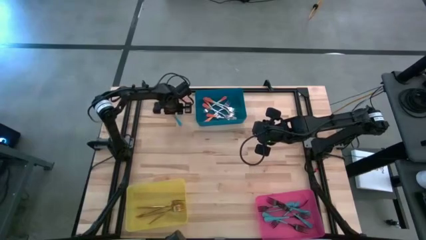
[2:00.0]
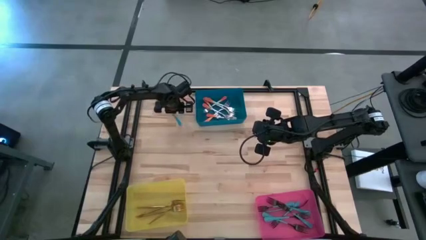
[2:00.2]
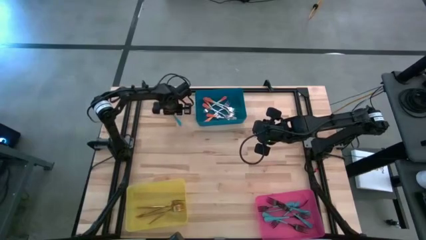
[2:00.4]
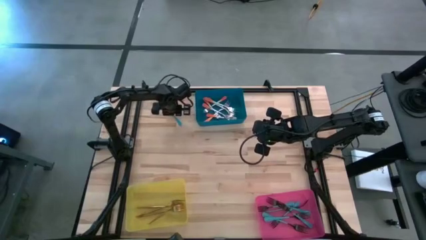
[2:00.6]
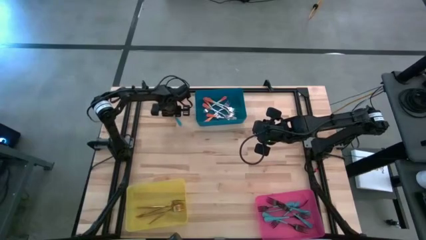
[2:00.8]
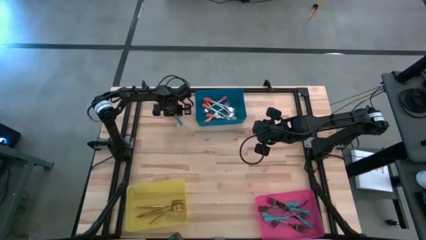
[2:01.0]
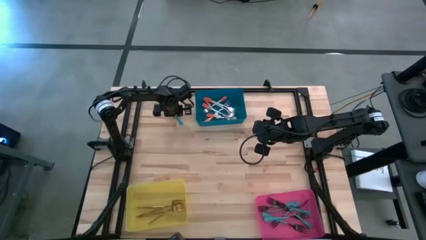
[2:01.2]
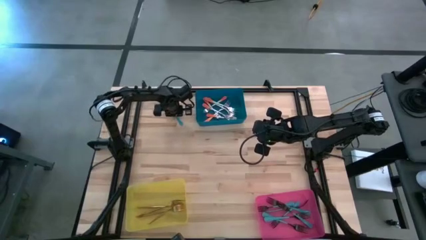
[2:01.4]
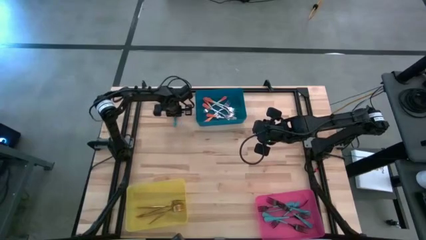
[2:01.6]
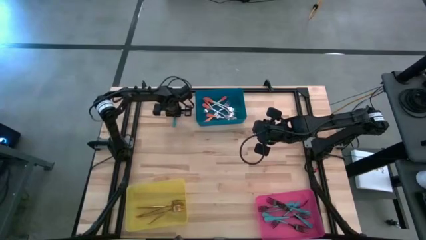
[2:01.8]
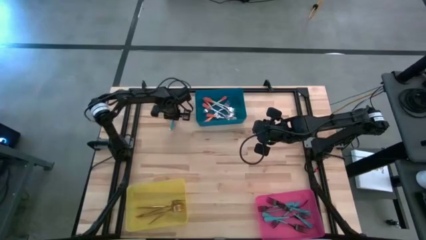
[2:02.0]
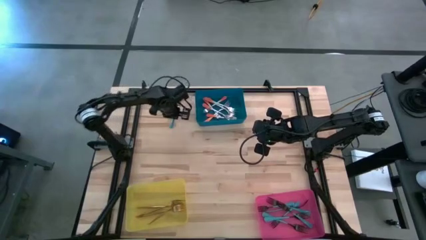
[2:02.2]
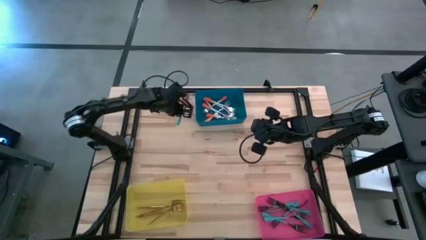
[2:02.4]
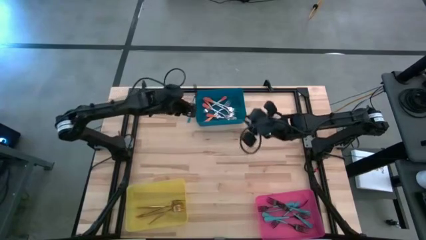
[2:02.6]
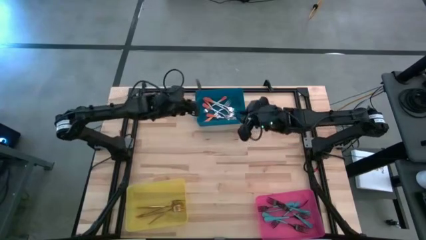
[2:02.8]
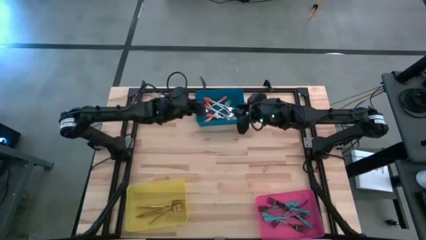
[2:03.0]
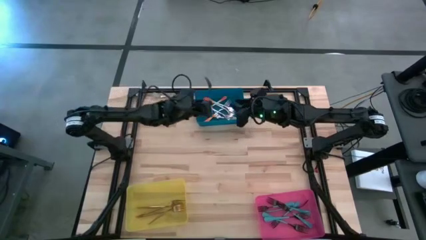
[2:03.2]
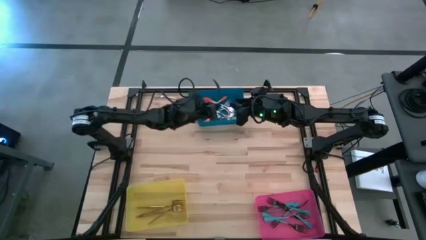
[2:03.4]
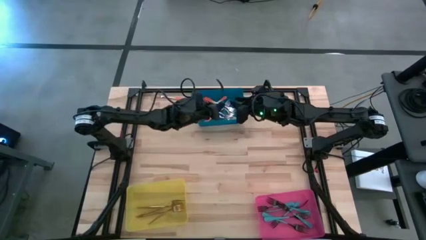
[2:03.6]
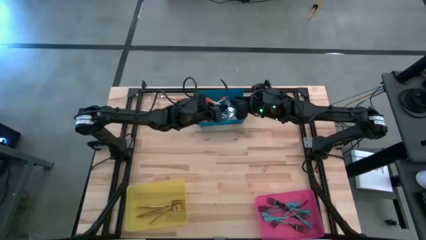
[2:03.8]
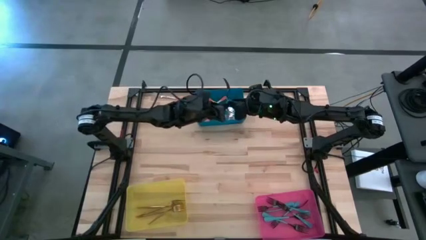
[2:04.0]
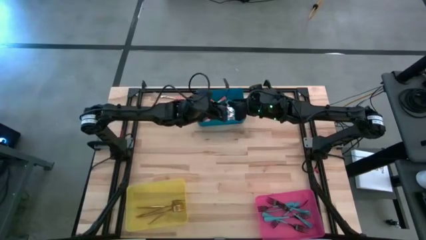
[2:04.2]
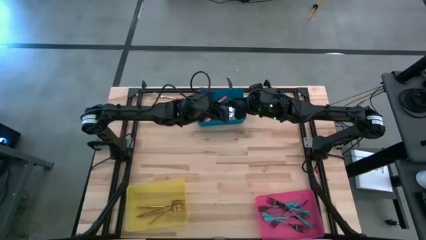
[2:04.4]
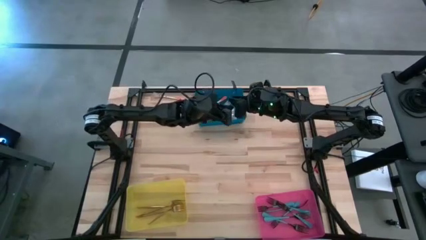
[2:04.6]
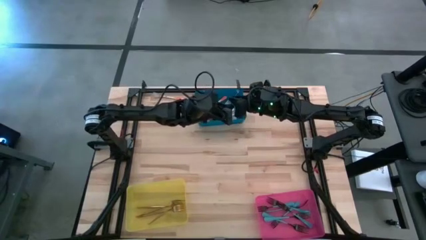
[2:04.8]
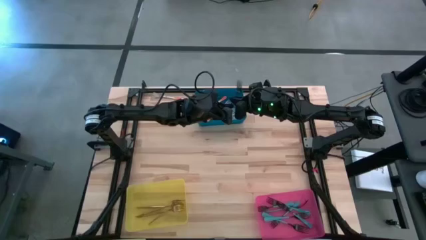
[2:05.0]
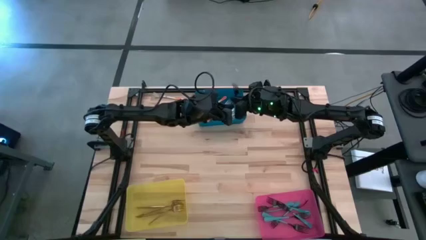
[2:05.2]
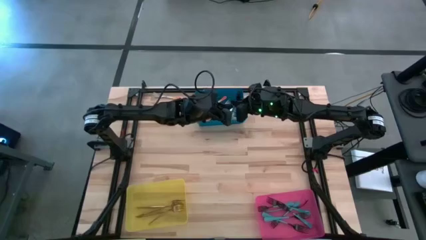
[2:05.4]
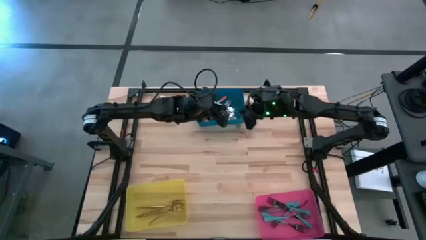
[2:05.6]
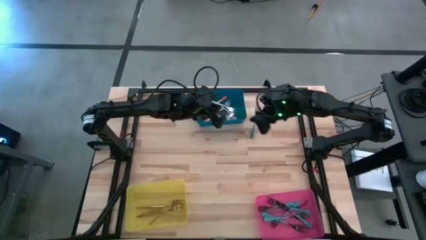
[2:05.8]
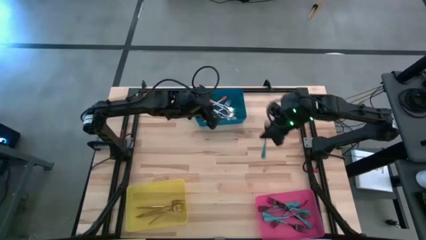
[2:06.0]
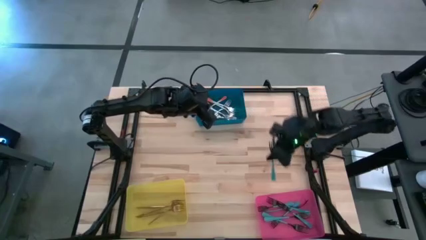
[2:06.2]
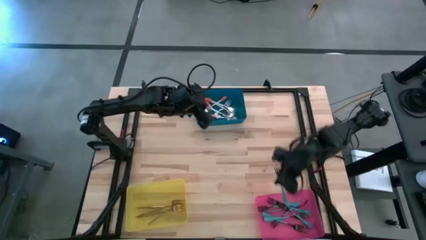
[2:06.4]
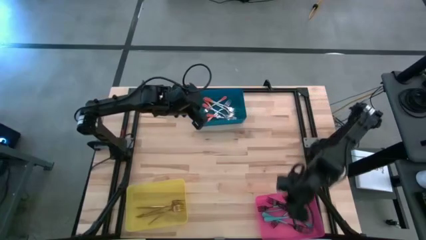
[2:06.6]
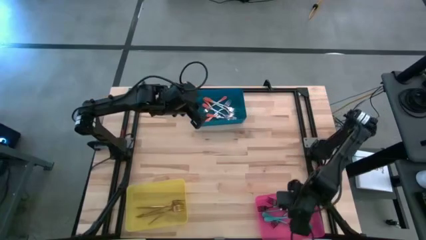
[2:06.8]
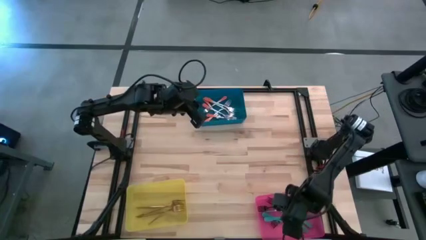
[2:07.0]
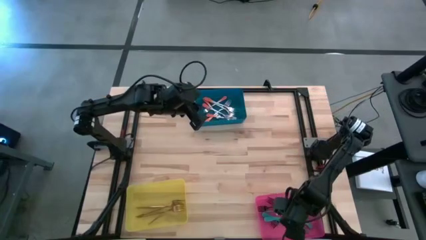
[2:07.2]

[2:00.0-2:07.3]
Task: Sort silverware by color (type)
Put the blue fork into the pink bin

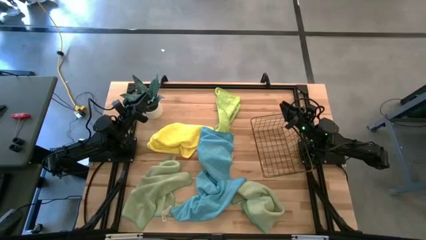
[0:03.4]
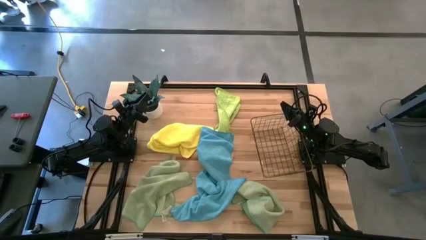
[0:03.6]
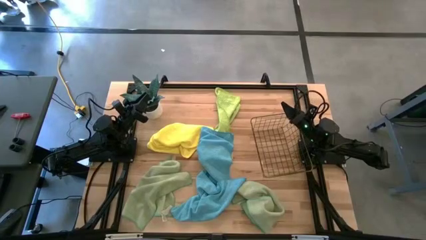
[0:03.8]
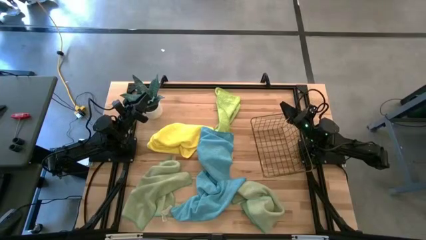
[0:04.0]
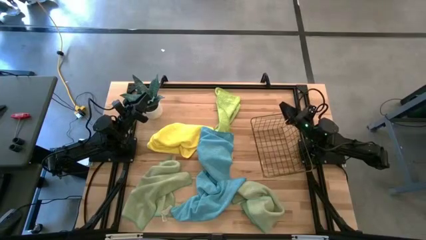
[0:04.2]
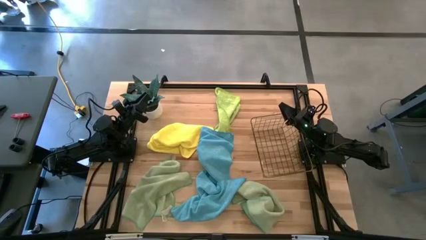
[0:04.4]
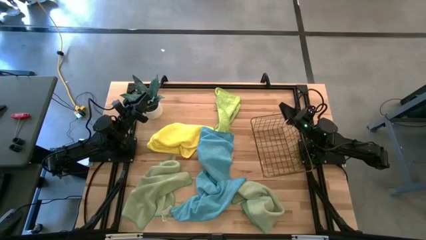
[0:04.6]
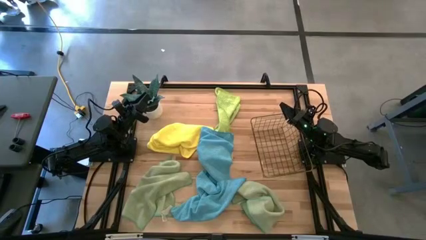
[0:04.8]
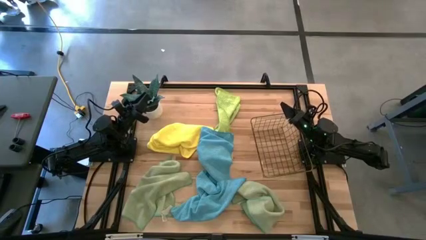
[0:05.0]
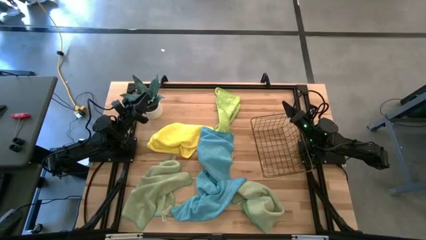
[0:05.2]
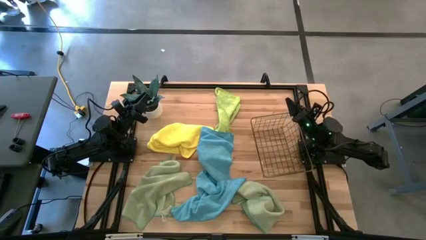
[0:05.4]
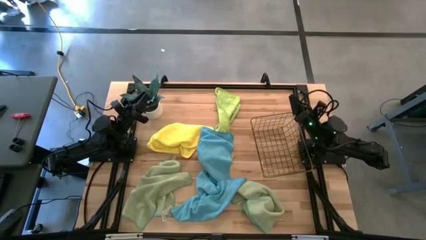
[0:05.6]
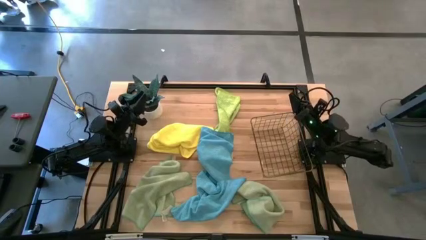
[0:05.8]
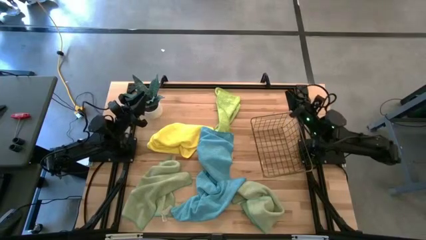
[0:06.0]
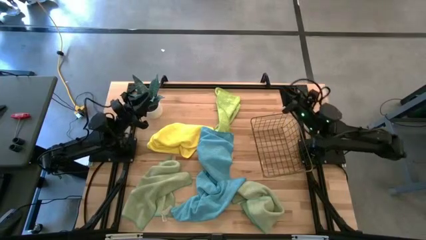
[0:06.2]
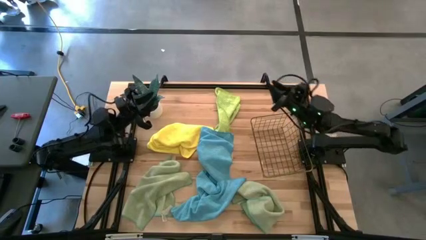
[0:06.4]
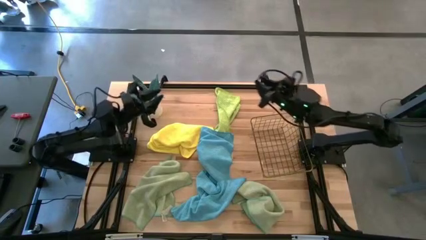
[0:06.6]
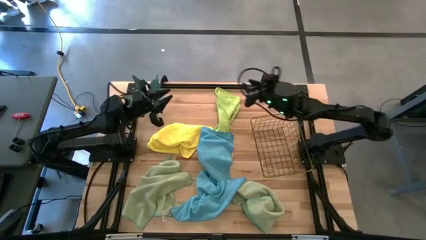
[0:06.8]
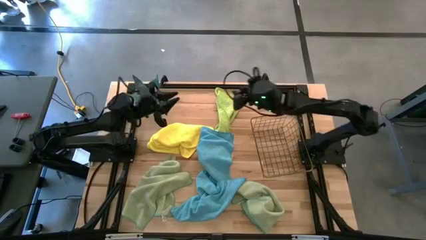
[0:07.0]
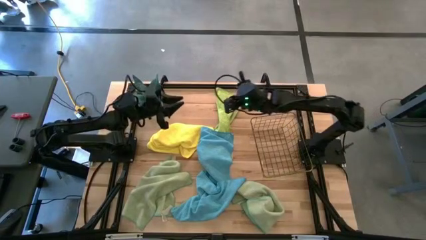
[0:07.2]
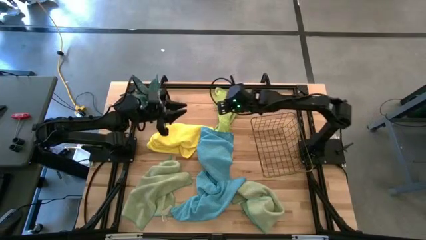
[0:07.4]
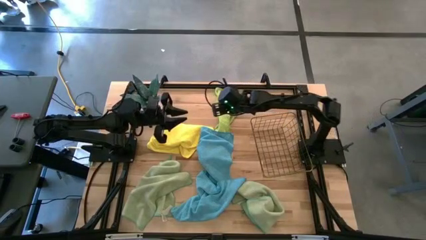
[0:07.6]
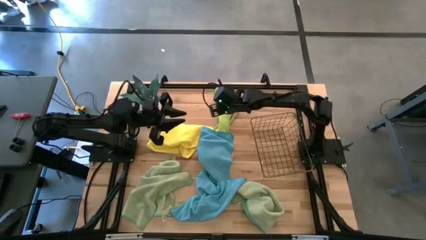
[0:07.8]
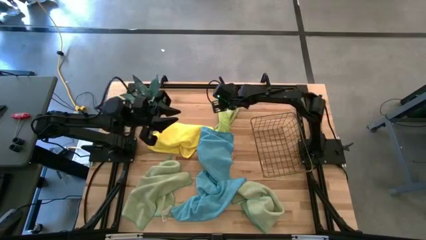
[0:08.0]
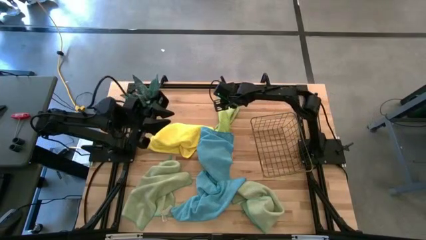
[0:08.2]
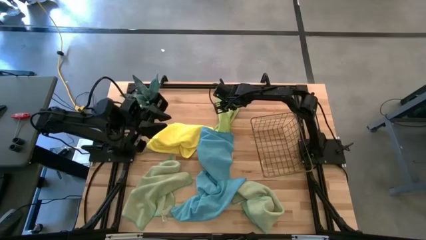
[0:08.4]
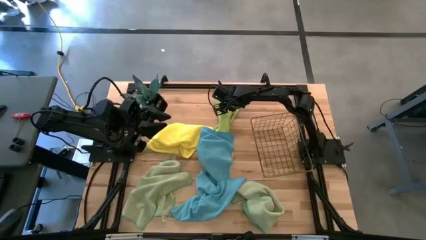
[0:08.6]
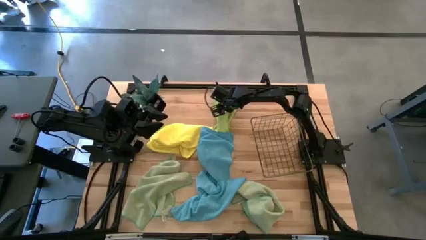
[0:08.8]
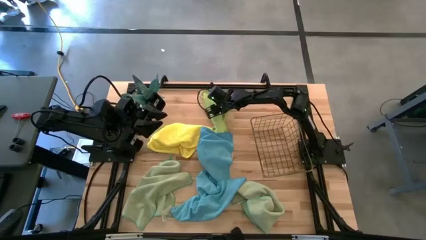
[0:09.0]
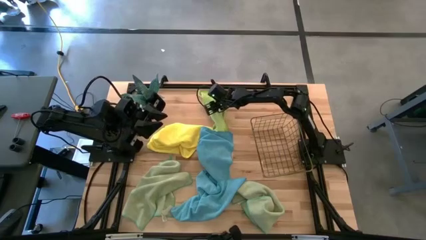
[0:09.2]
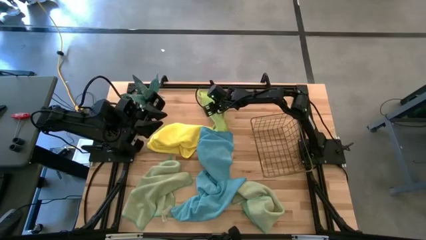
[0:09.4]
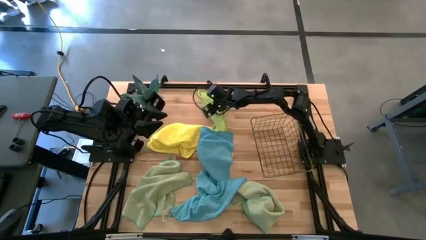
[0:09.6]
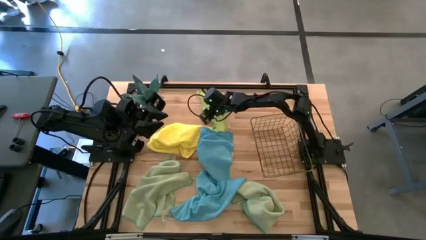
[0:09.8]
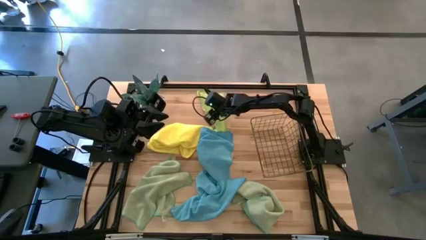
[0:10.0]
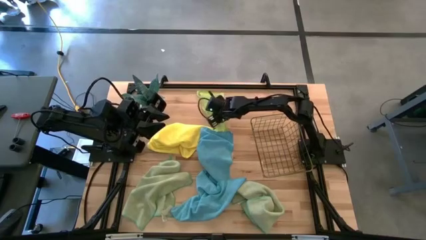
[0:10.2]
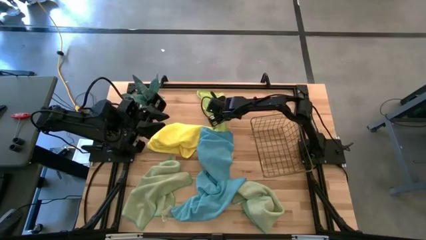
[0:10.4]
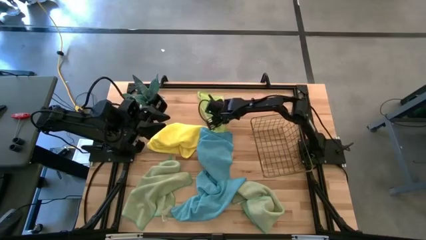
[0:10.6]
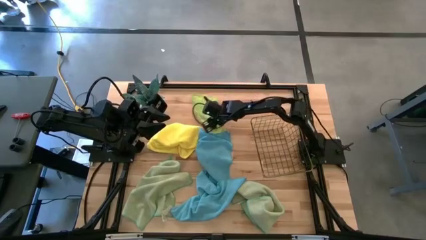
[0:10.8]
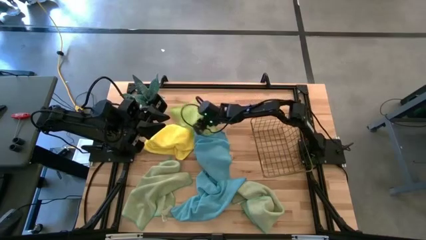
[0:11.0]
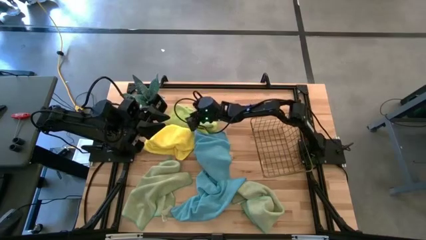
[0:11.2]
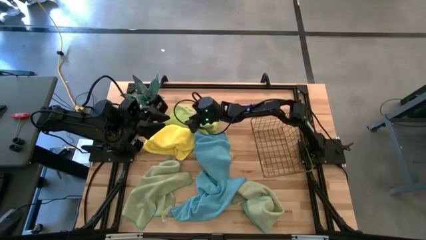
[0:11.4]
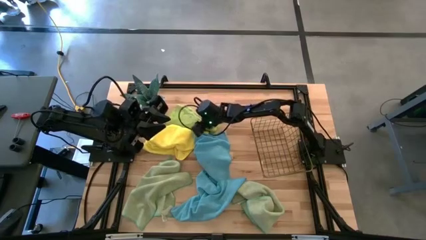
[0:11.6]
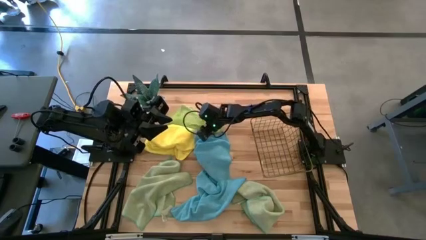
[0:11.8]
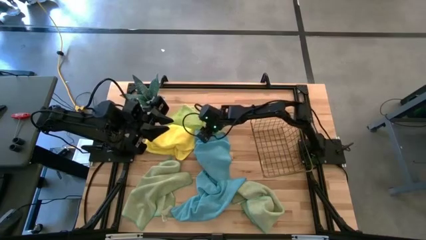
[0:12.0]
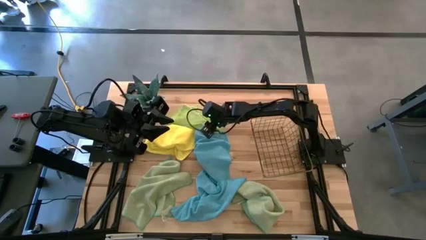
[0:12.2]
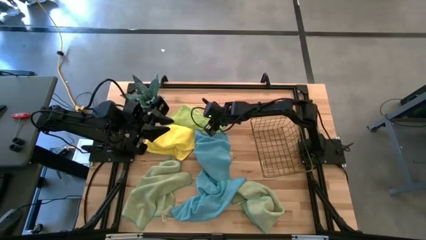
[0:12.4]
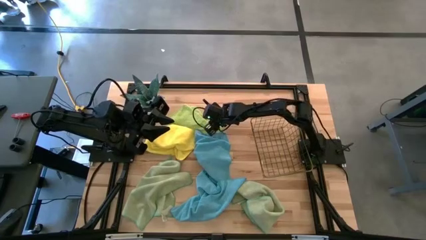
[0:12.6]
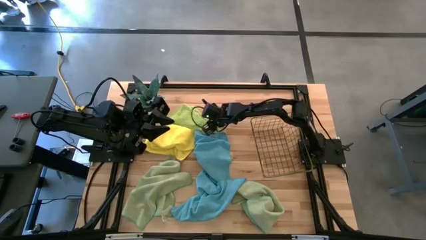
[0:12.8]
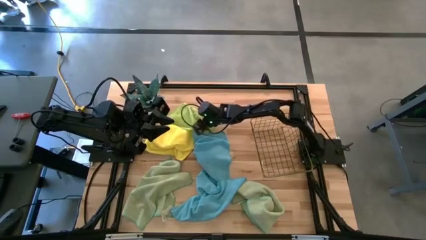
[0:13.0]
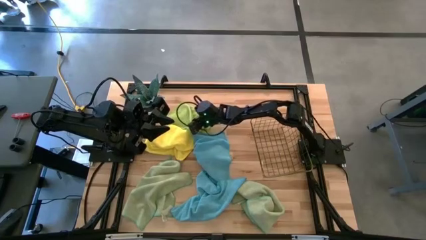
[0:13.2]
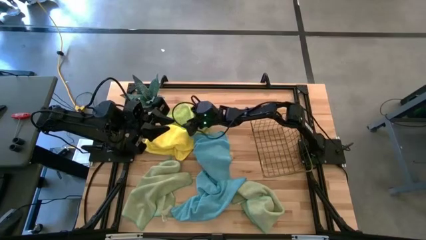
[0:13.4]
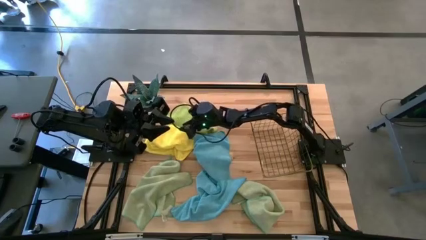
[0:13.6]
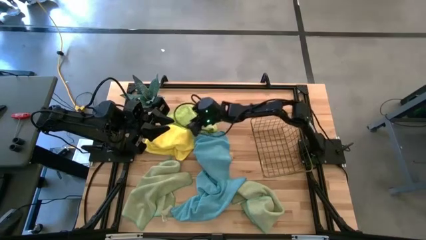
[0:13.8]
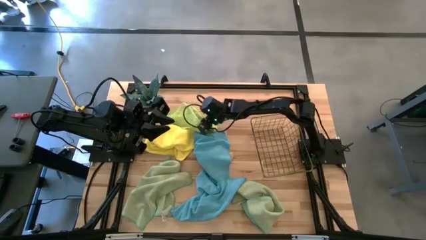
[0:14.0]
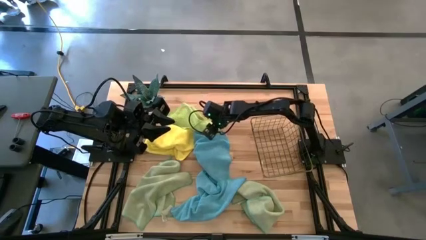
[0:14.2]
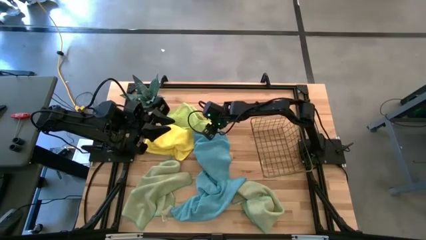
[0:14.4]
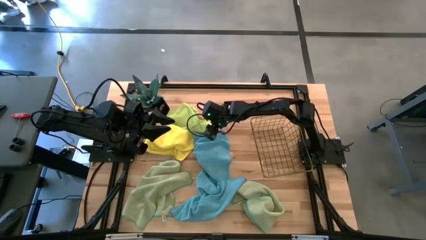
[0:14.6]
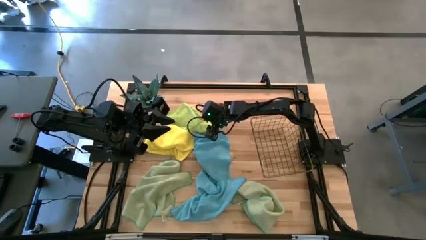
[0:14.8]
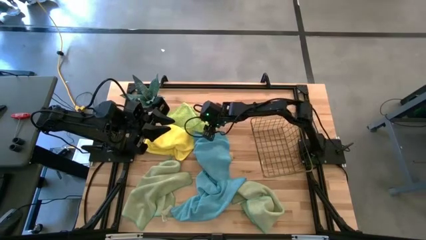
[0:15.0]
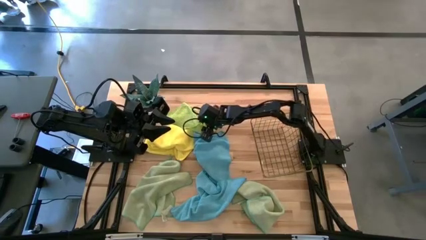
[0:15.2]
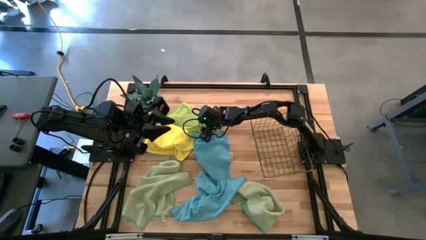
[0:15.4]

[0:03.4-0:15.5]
Task: Fold microfiber towels
Move the light green microfiber cloth to the middle left of the table
